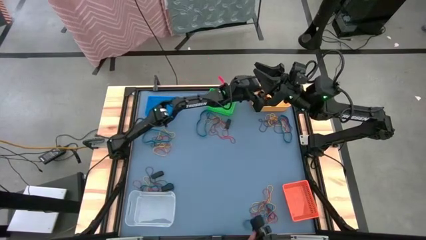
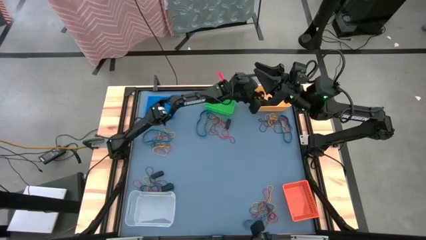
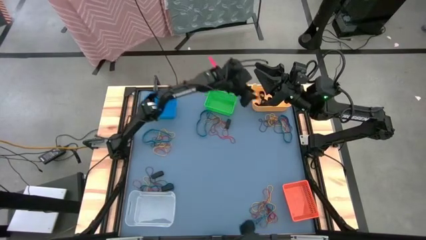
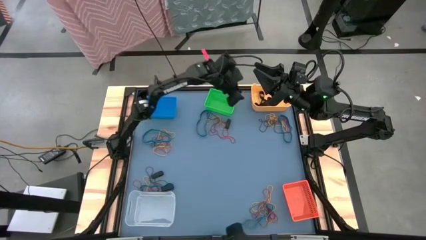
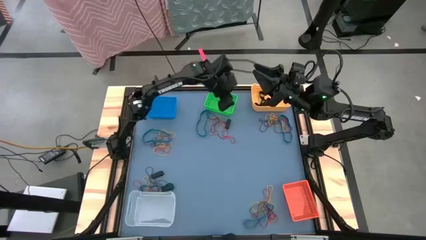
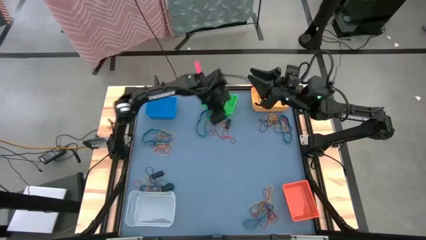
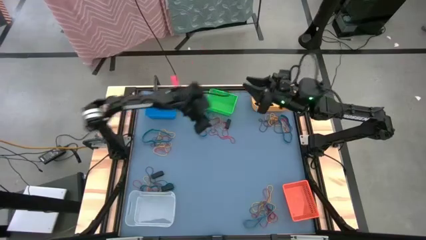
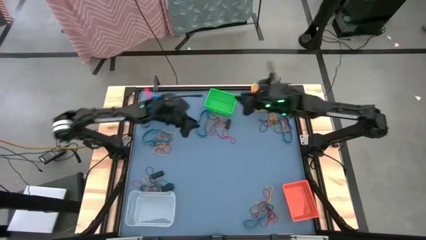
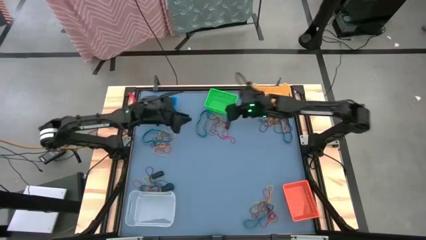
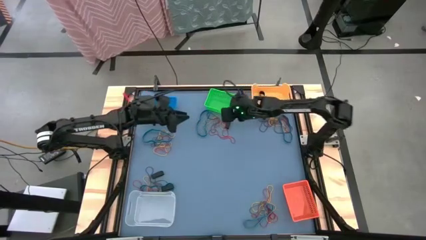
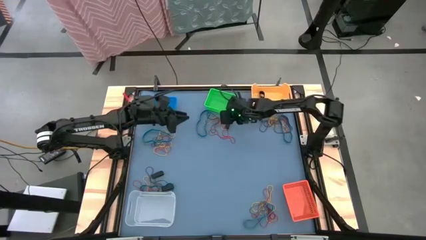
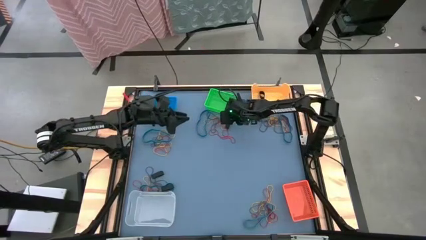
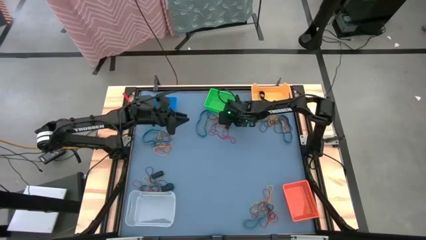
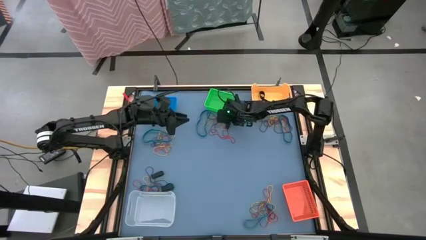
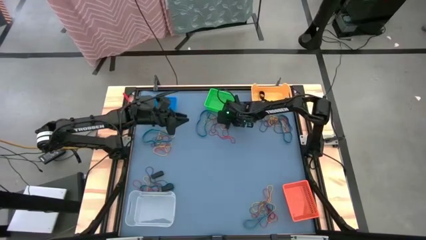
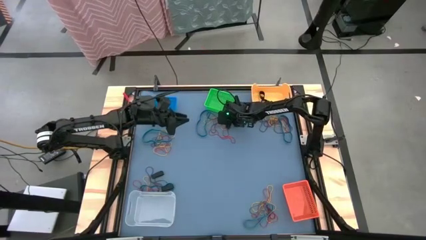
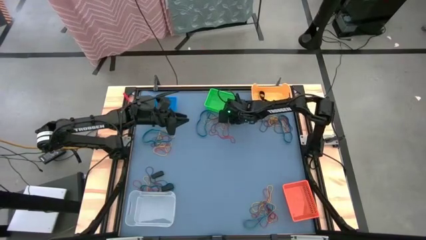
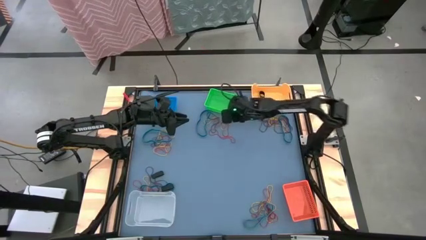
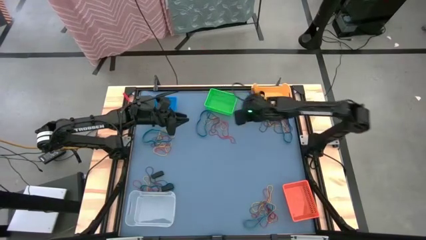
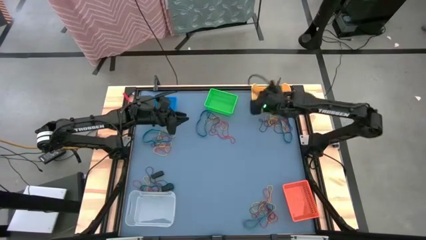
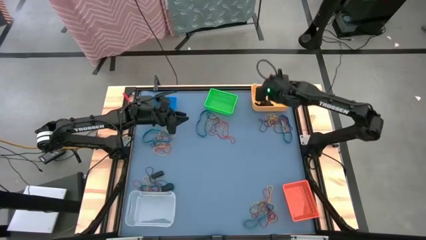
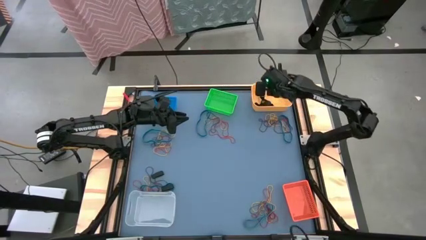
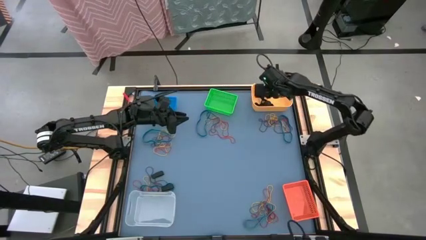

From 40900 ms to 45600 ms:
Task: Sort rubber bands into baskets
Put the black rubber band into the yellow bin

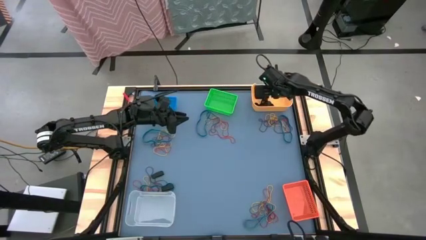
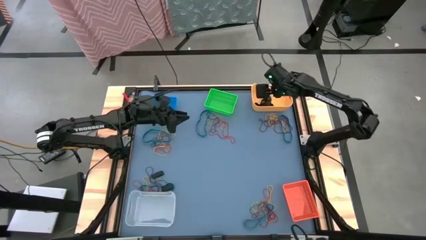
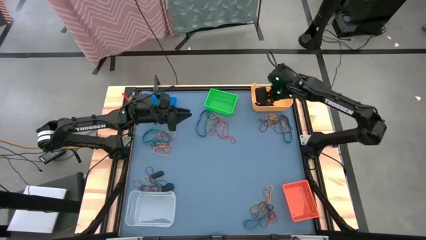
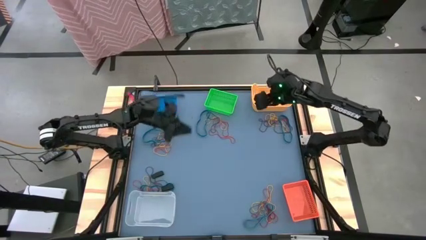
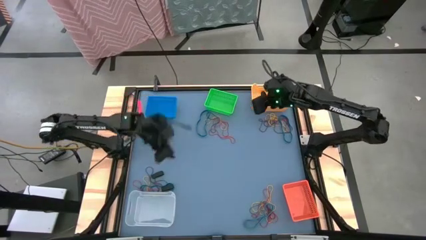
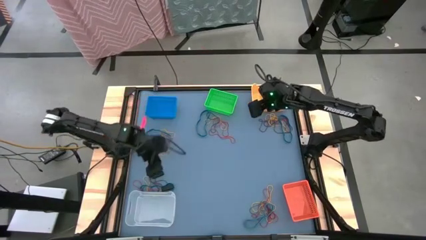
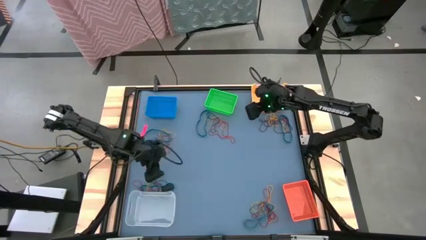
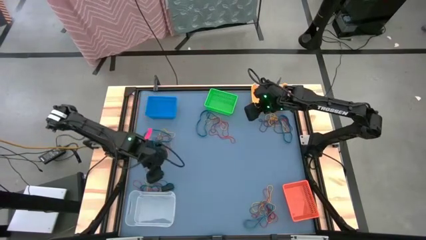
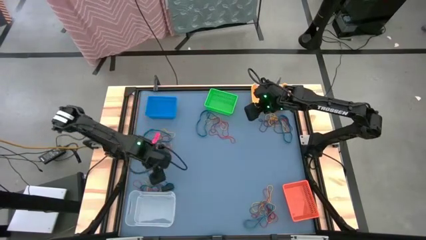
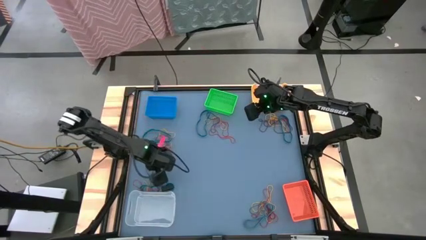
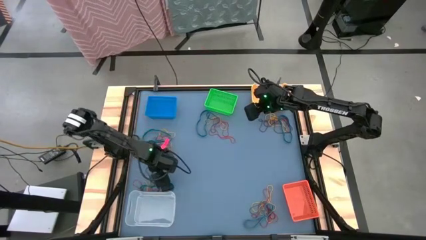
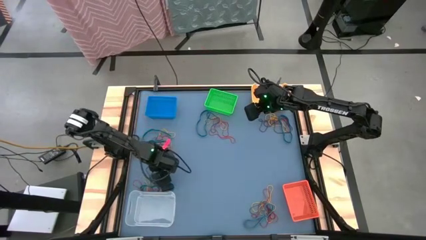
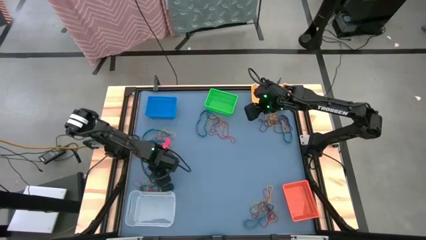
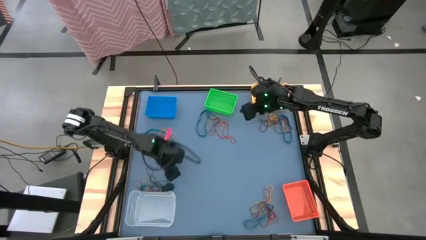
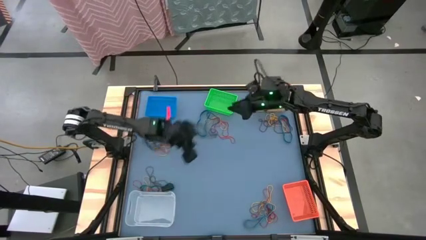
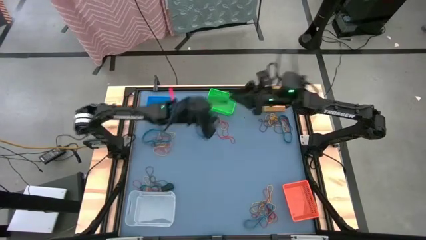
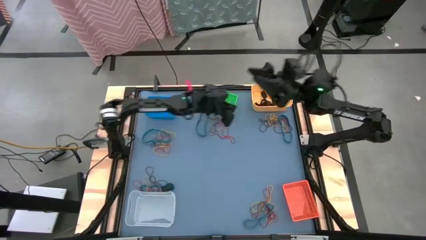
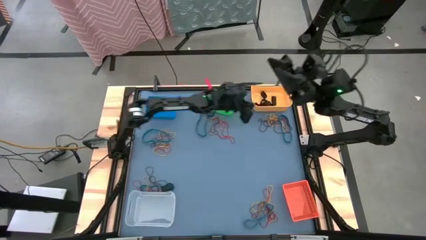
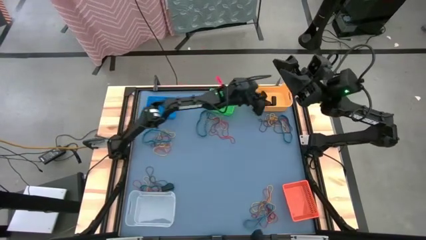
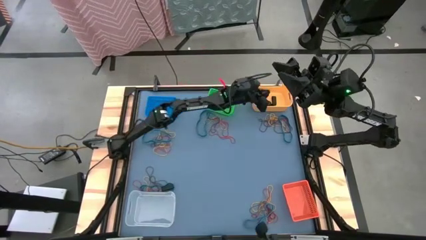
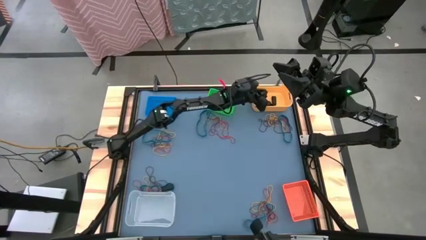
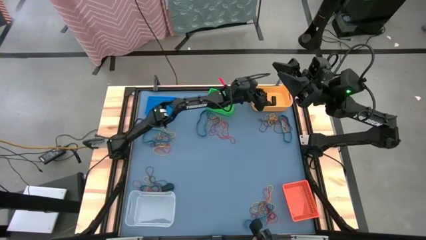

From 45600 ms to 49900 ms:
Put the black rubber band into the yellow bin

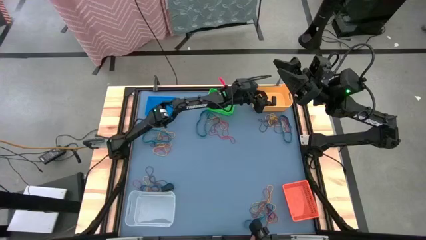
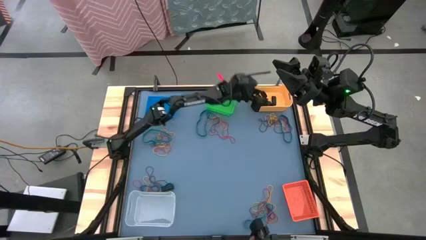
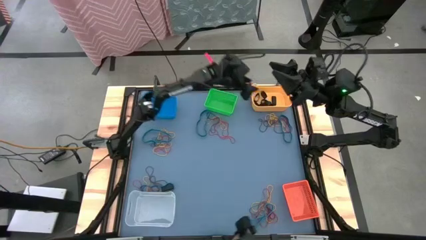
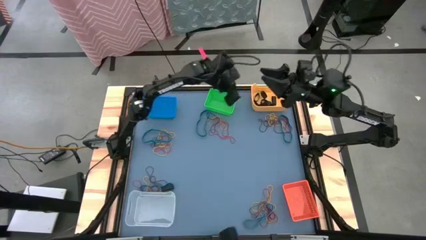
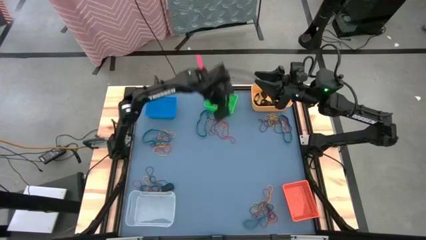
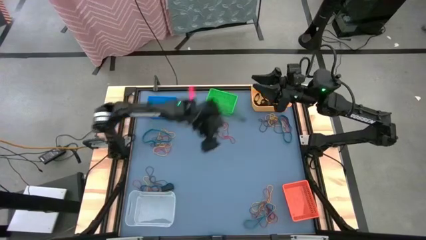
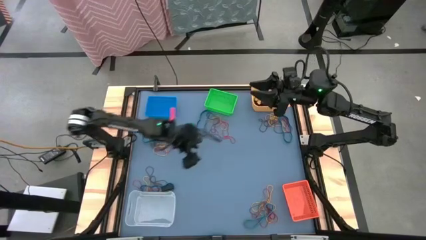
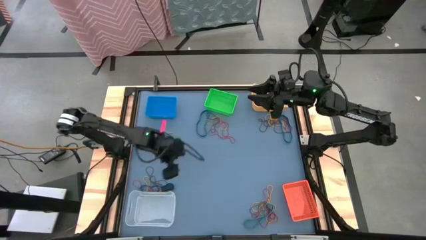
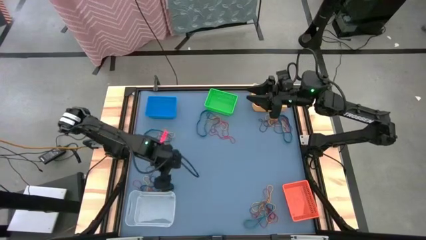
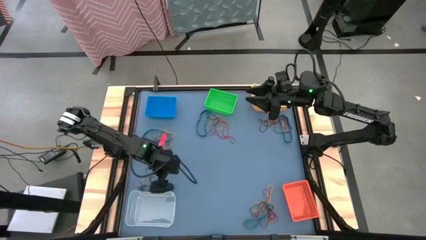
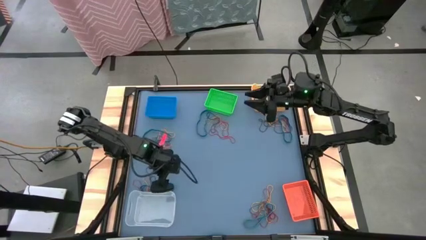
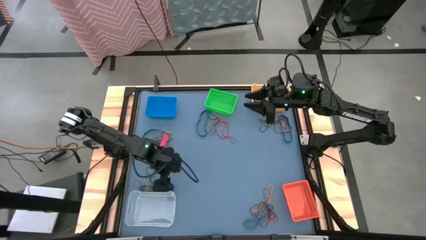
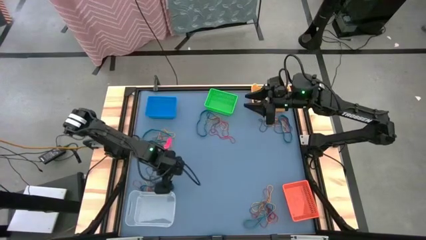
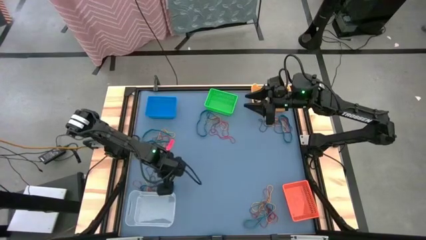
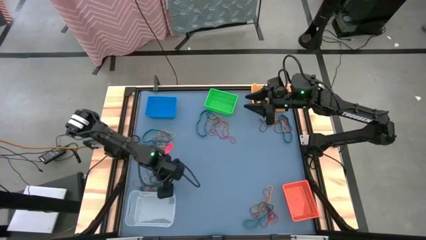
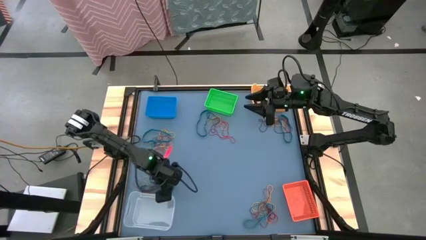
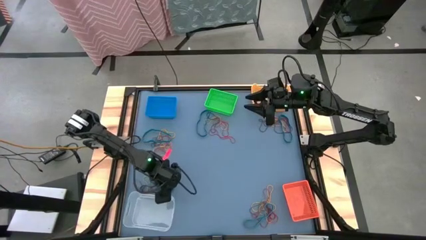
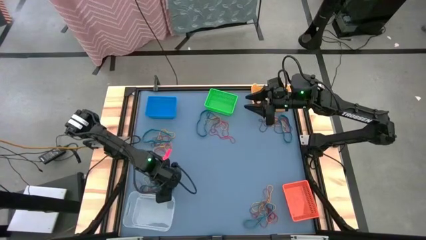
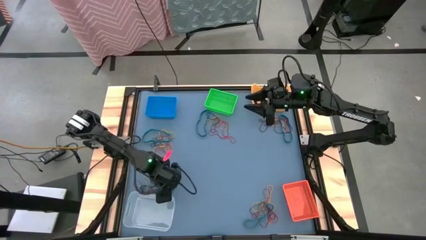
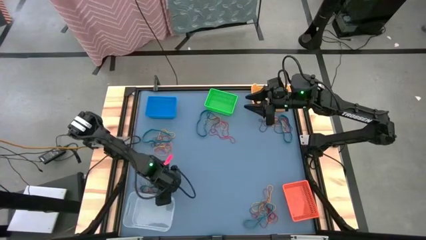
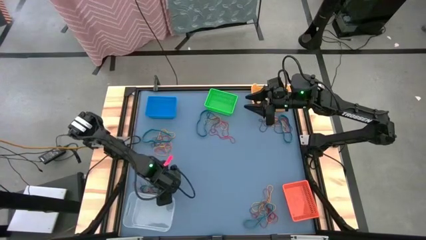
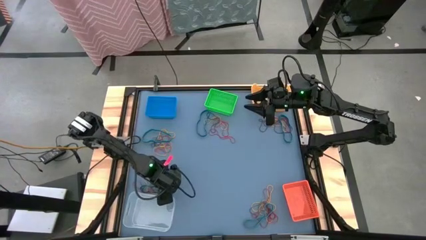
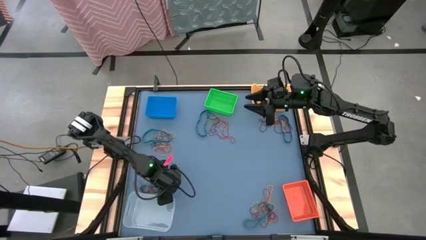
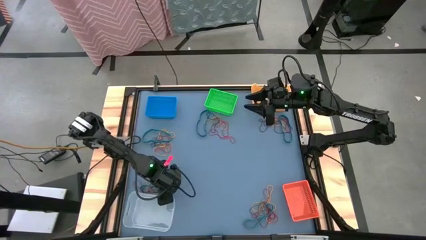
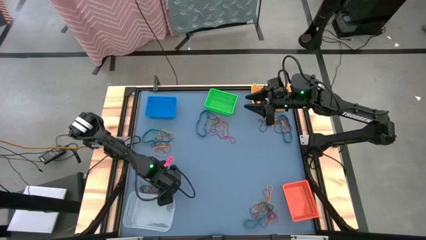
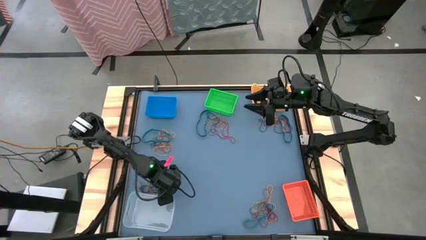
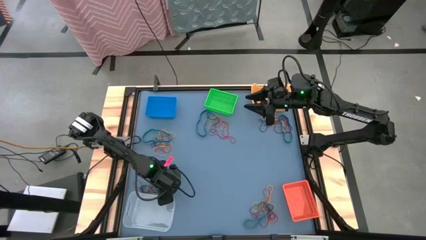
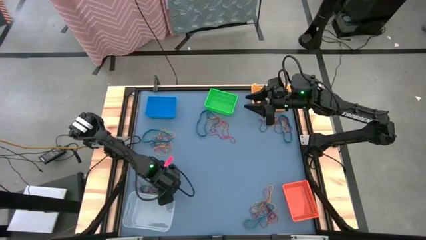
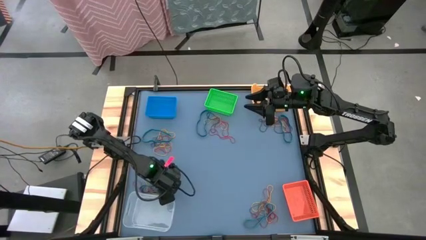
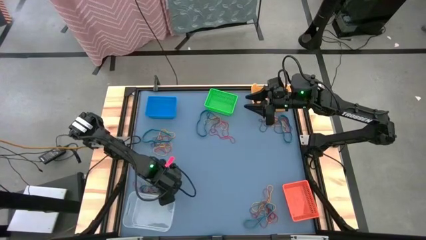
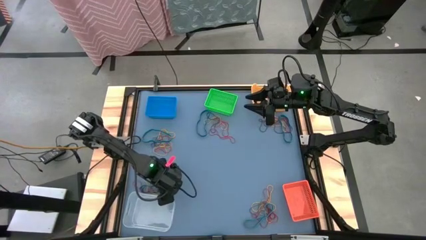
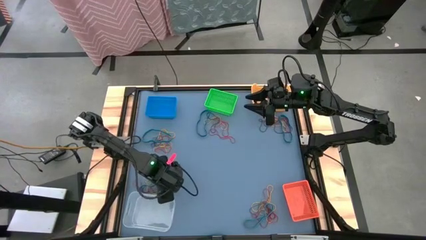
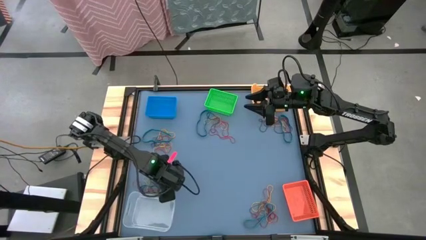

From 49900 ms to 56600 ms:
Put the black rubber band into the yellow bin

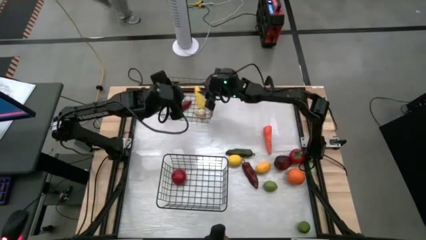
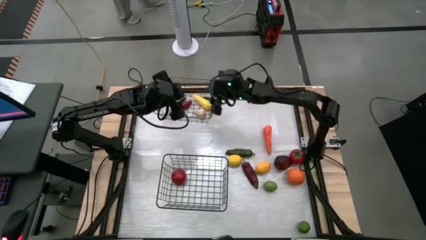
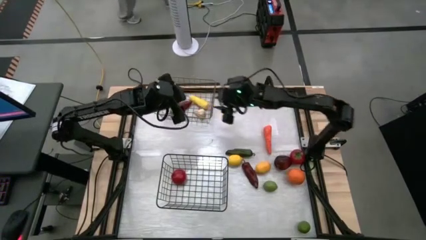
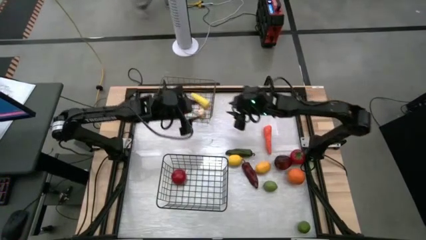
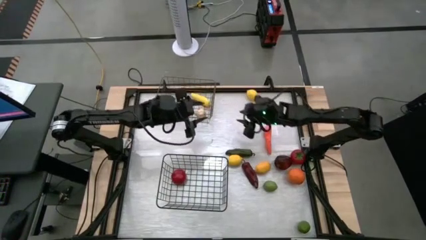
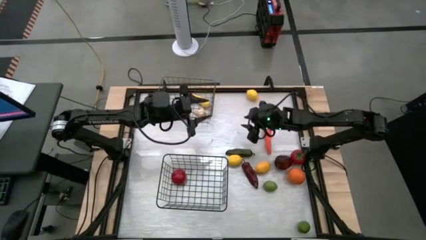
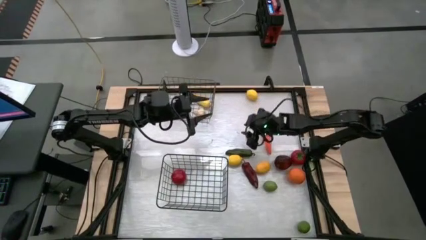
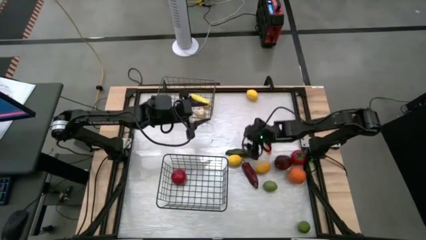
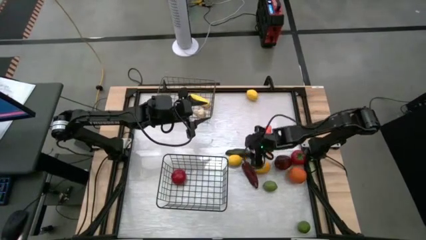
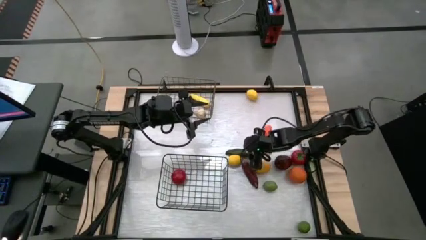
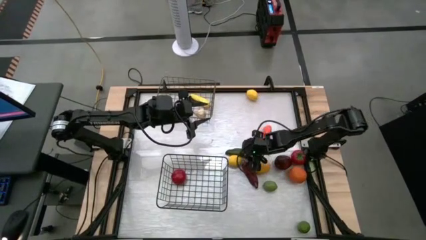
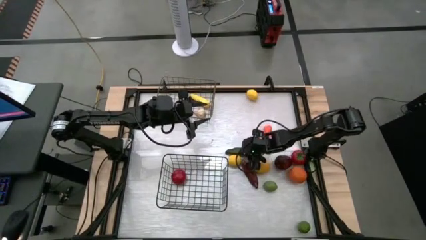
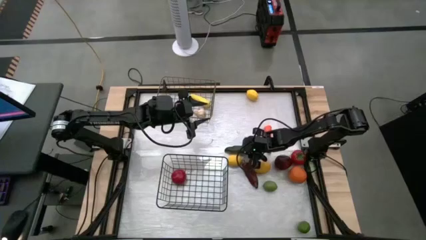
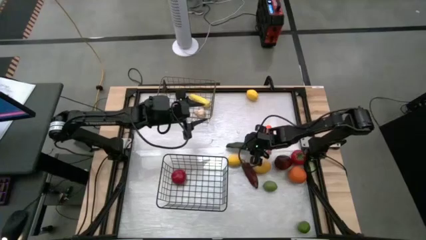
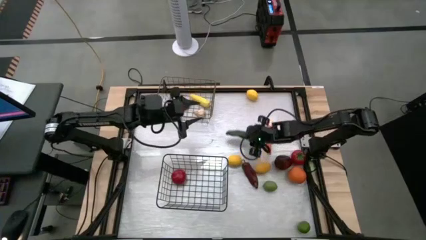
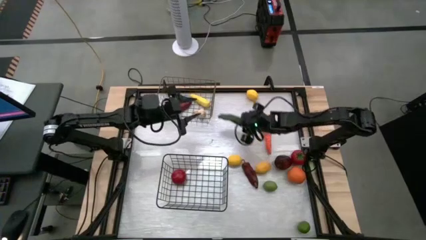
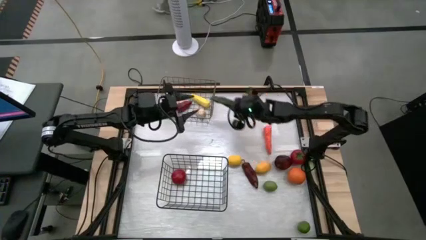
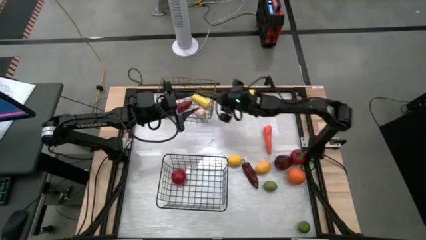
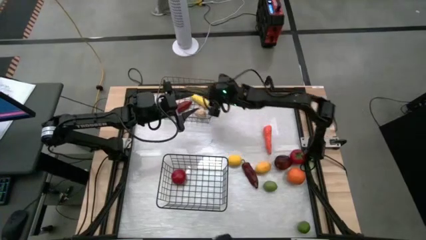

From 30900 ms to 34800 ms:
Task: Sort produce into baskets
Put the green chili pepper into the top wire basket
